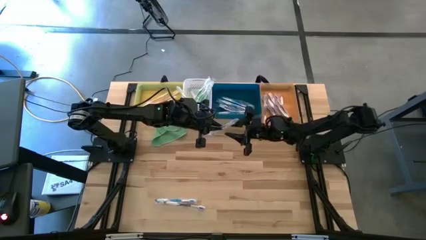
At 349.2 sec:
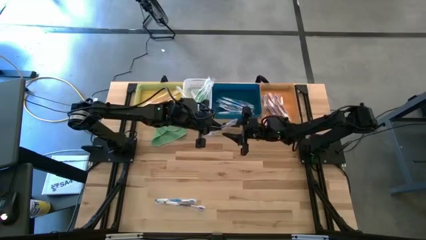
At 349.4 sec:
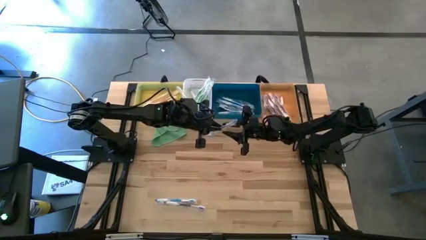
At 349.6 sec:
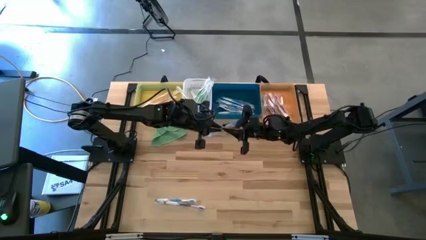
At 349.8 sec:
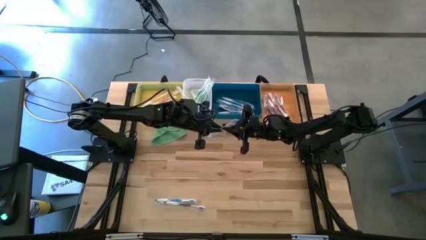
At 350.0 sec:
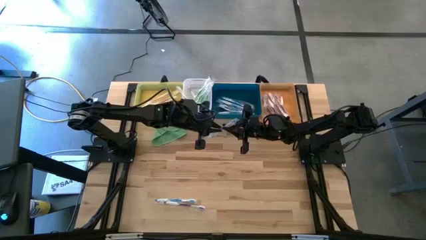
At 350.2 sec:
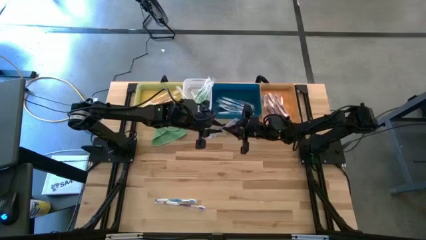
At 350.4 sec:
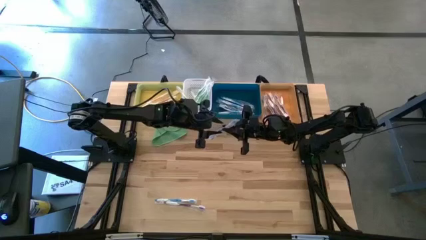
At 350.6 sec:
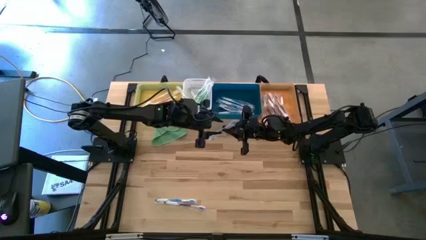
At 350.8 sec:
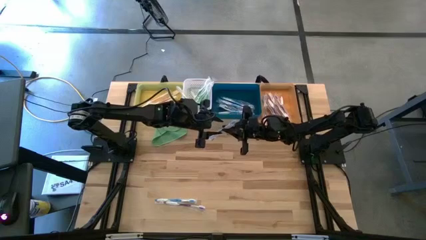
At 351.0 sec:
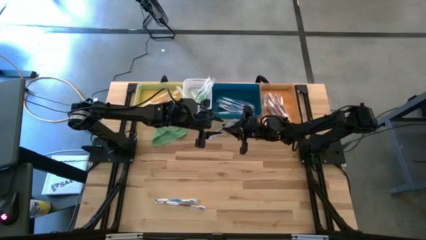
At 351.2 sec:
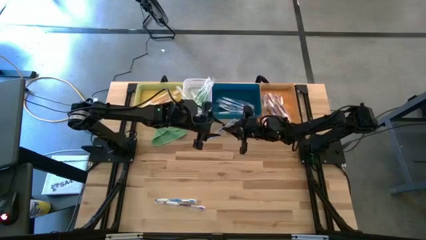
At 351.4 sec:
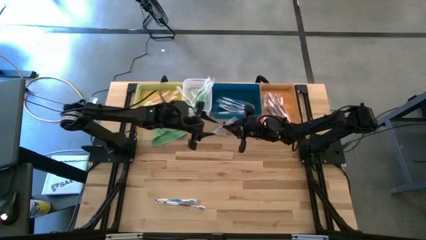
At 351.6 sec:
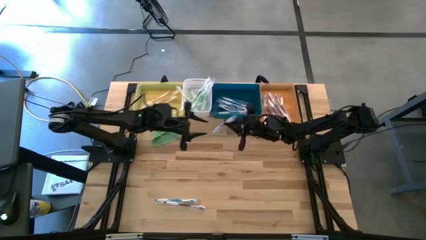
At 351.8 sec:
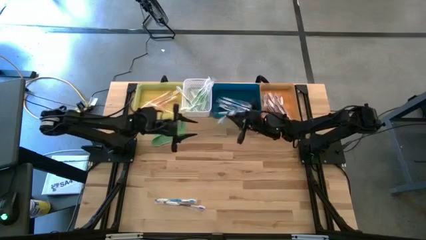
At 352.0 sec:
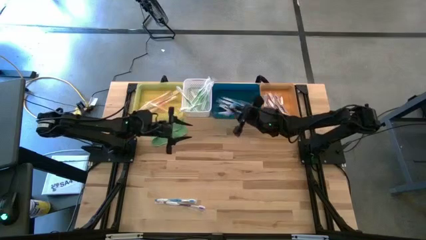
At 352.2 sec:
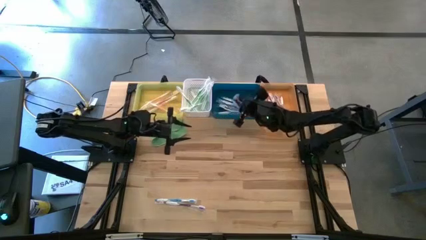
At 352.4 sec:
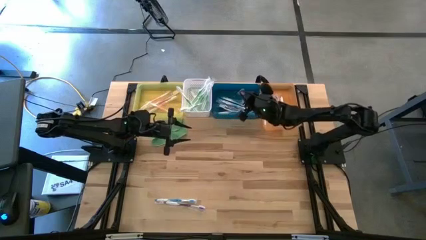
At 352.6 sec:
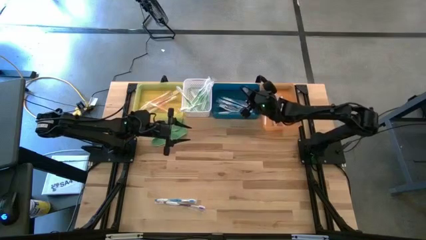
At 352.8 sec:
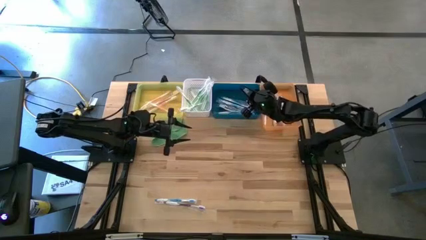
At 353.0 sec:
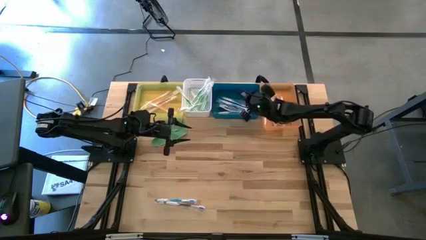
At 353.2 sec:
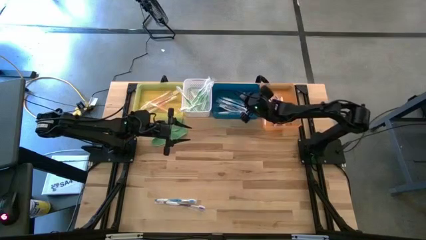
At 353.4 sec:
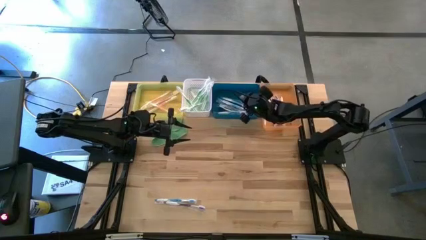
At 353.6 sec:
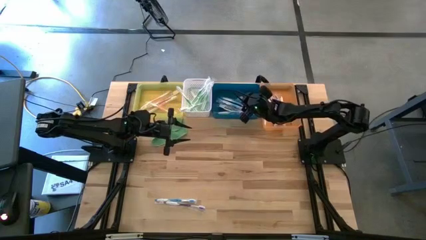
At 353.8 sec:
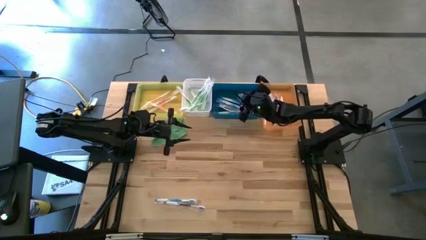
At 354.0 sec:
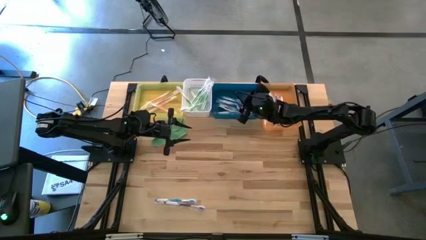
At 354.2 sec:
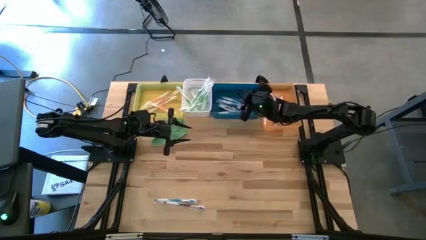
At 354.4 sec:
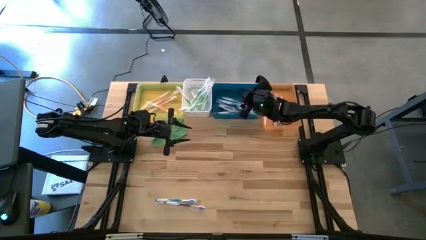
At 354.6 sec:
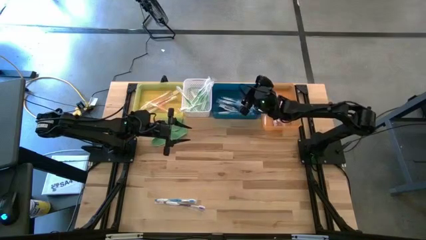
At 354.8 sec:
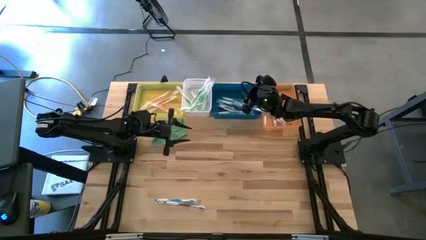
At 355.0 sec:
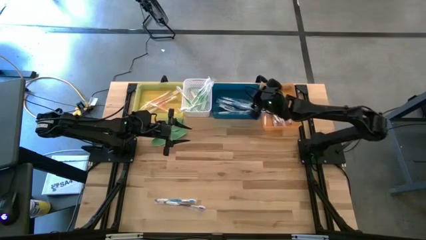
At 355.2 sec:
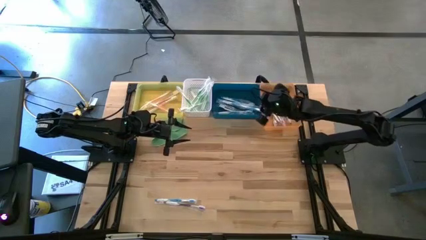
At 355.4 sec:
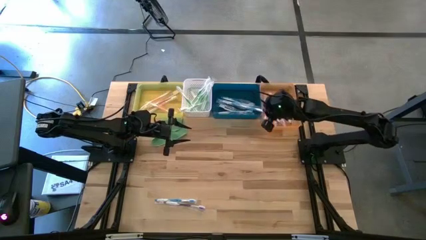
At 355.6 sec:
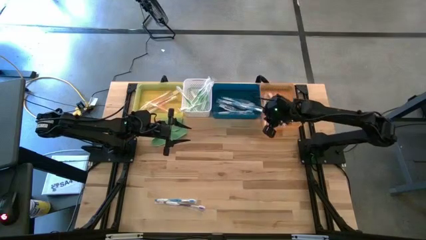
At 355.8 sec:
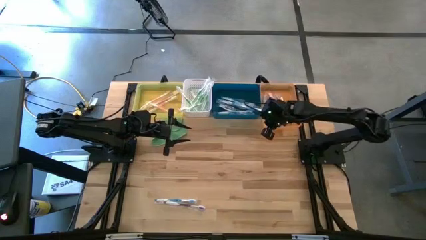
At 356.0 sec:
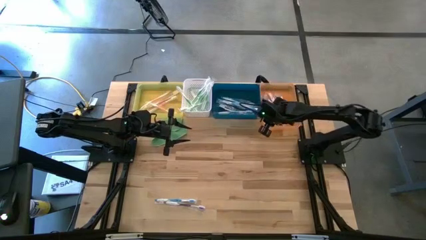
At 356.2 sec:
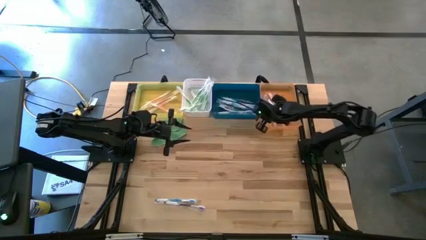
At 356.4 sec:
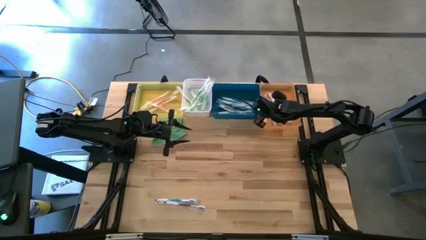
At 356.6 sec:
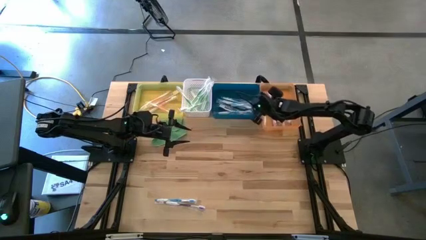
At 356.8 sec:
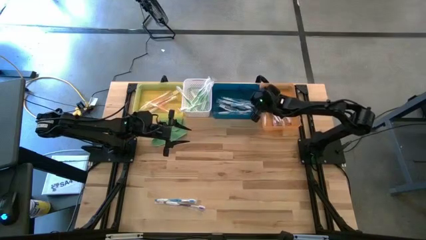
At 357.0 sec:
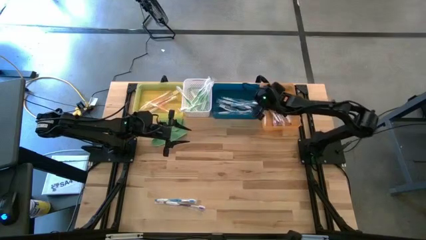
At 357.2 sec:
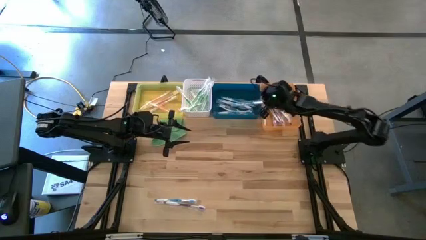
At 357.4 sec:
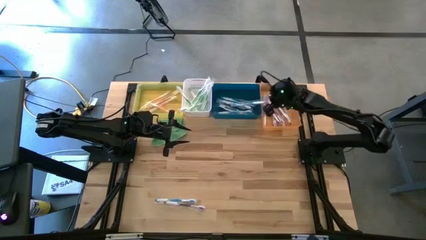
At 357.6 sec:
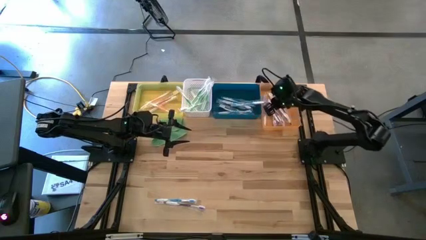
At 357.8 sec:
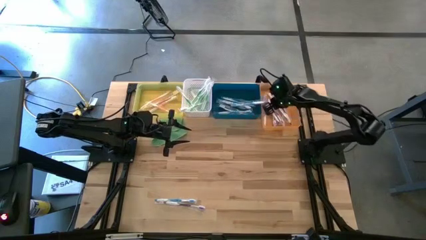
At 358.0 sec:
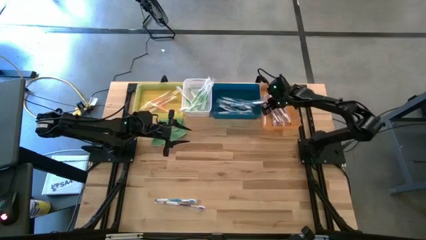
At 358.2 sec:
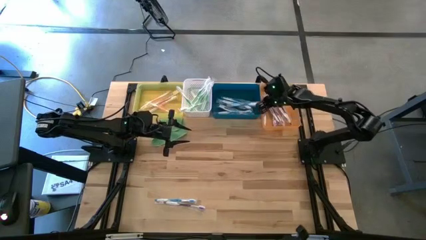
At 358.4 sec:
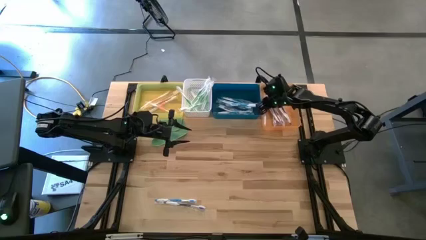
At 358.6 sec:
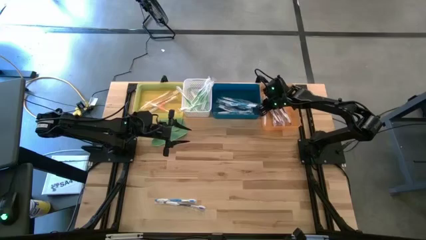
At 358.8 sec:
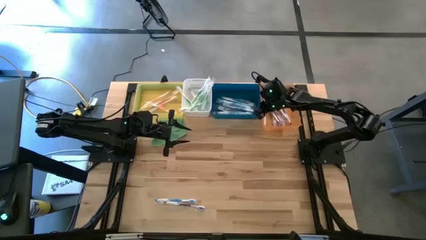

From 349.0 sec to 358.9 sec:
Task: Pick & Place Toothbrushes
Put the blue toothbrush into the blue bin

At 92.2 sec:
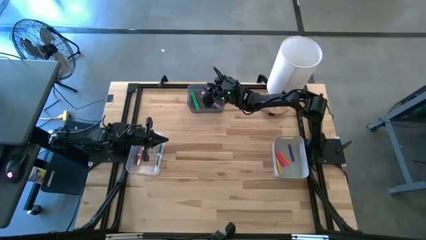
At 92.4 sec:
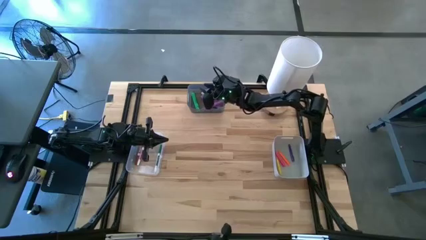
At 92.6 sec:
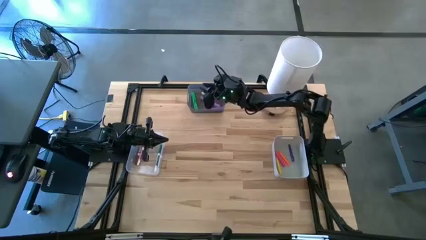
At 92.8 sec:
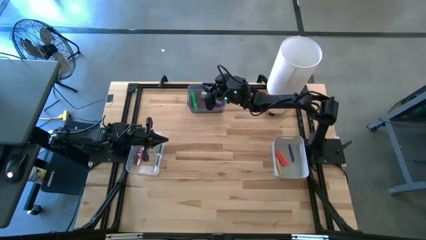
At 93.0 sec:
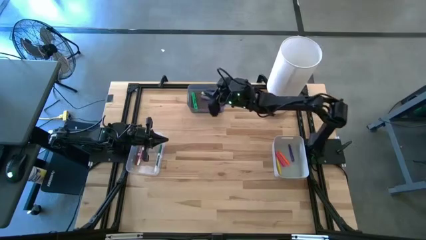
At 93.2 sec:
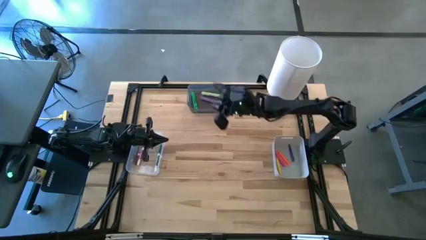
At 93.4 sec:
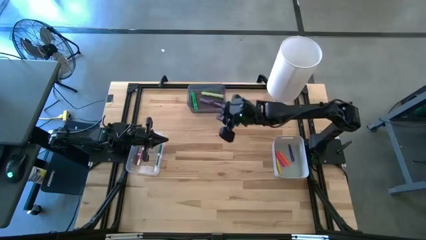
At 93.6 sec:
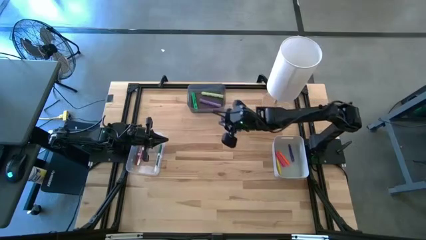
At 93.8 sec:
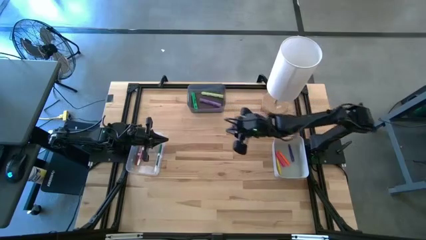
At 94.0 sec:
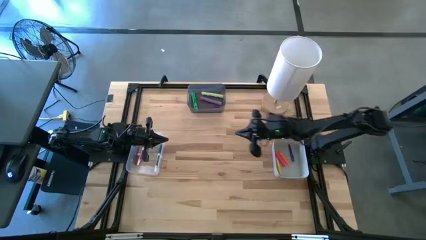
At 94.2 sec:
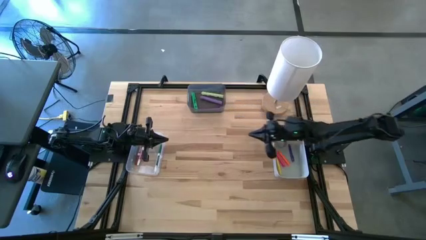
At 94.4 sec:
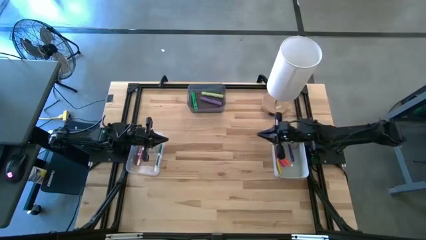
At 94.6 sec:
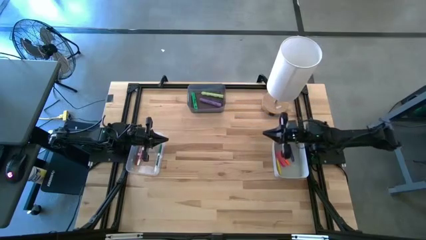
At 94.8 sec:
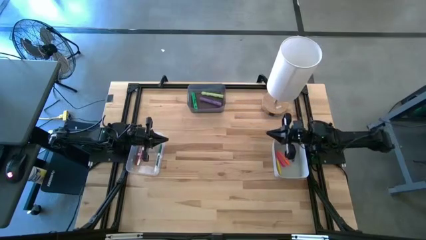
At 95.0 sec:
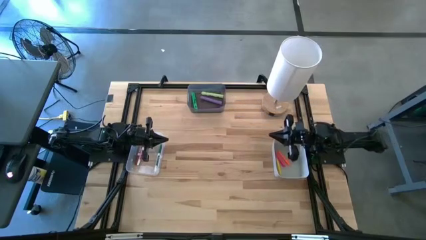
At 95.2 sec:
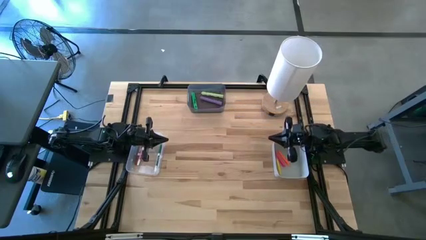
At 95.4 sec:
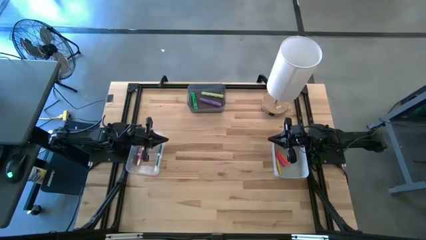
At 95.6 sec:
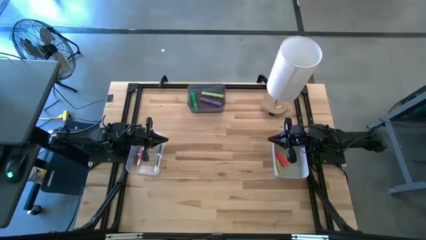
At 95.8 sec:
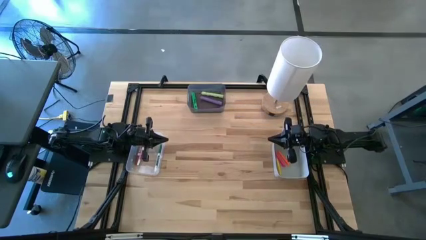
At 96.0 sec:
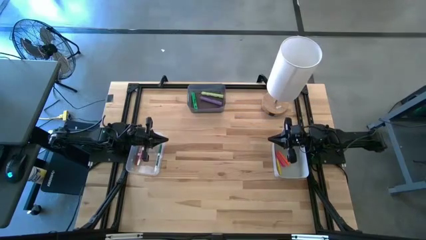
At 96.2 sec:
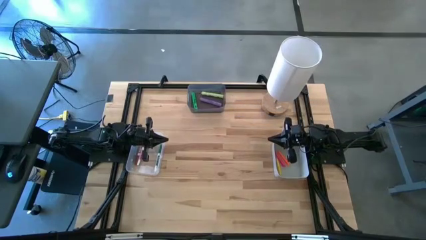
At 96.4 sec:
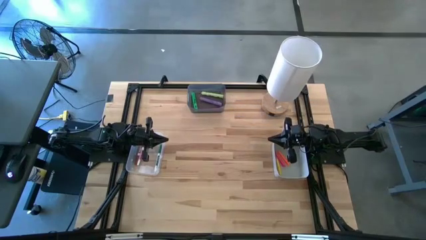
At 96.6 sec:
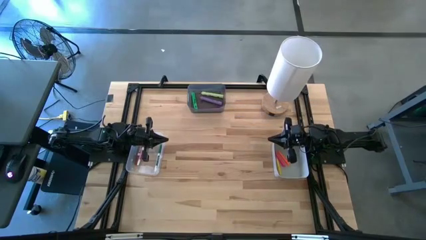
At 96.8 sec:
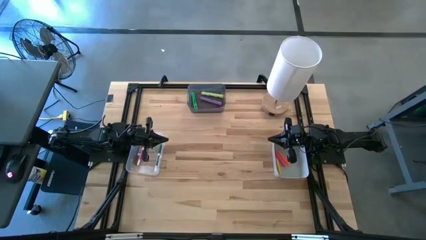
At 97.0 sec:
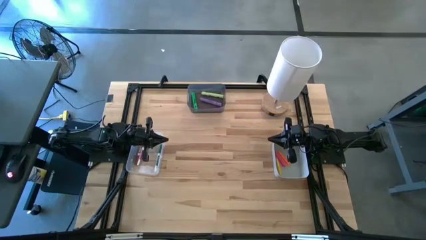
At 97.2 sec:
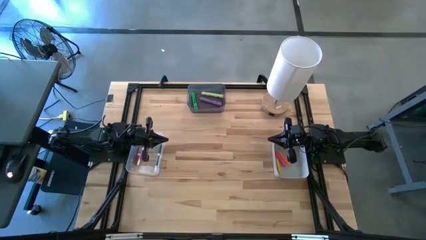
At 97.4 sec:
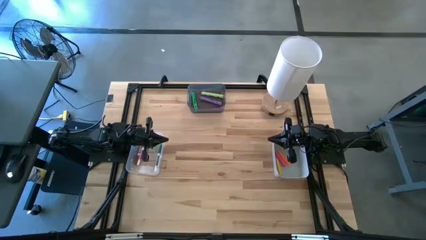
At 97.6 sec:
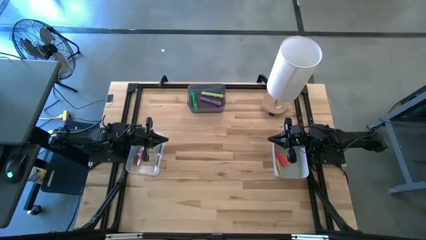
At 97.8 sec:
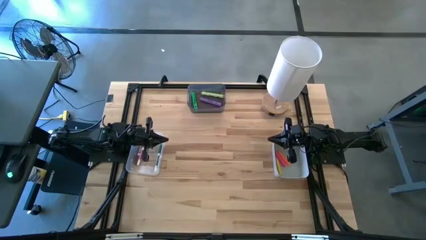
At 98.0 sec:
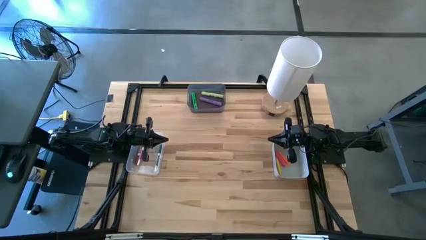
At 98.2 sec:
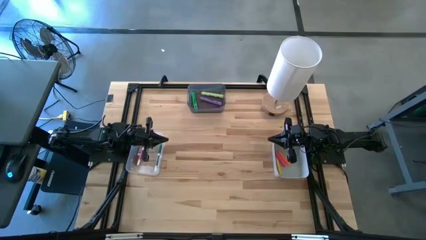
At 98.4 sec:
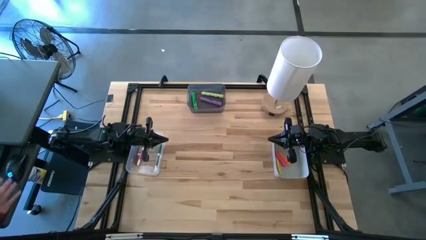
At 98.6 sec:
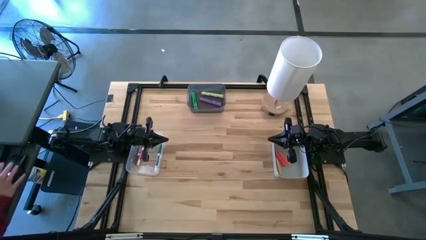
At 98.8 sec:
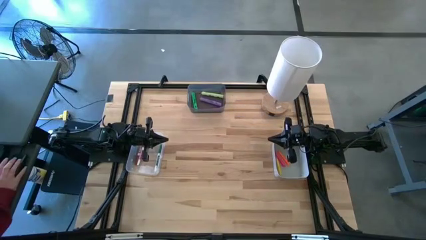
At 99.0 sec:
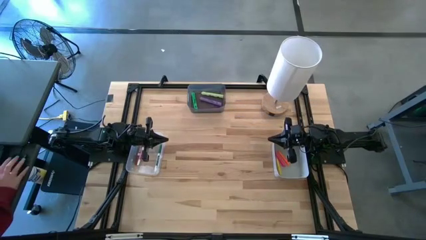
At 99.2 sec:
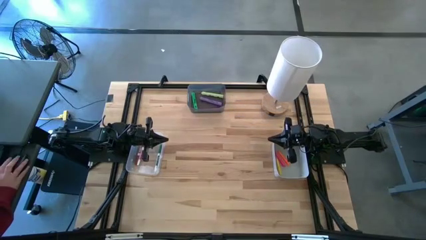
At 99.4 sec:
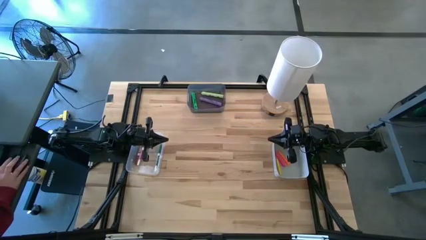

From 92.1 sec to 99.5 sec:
Task: Pick & Place Markers
Return to Home Position
